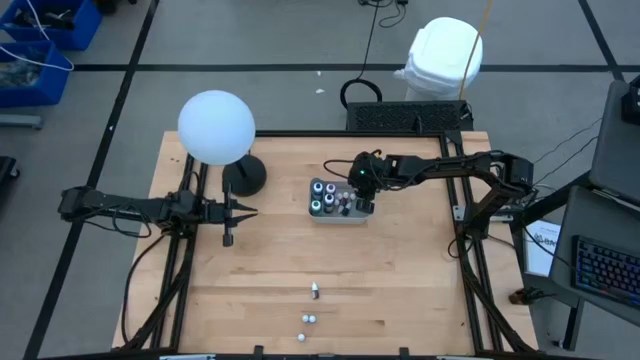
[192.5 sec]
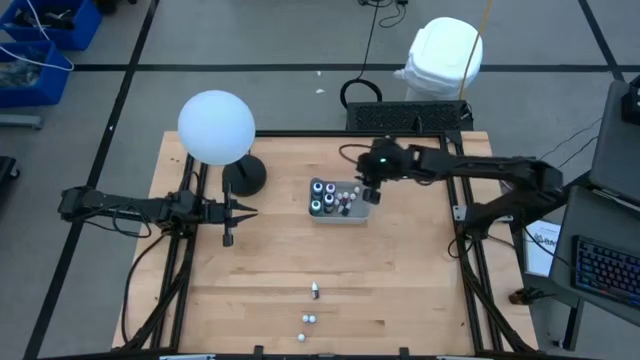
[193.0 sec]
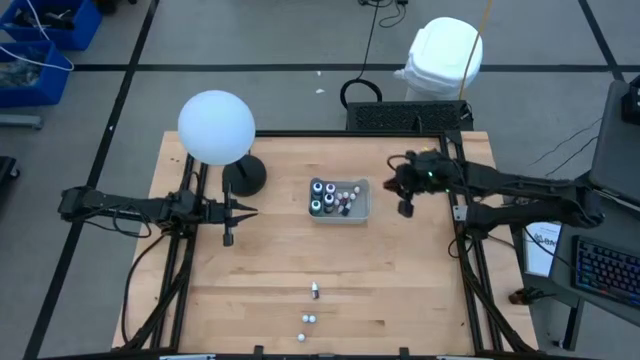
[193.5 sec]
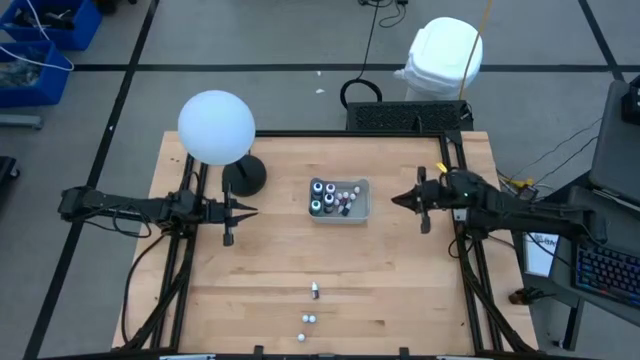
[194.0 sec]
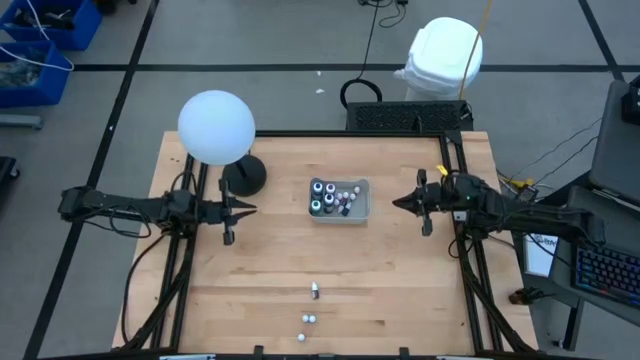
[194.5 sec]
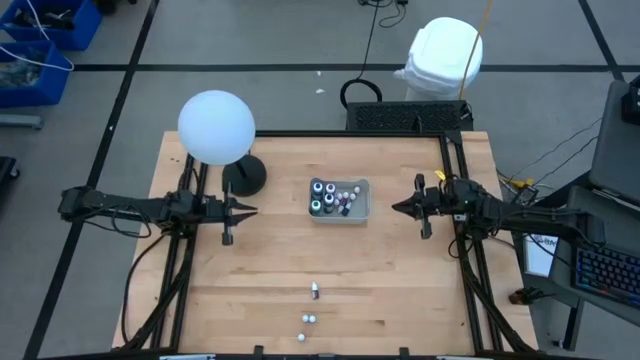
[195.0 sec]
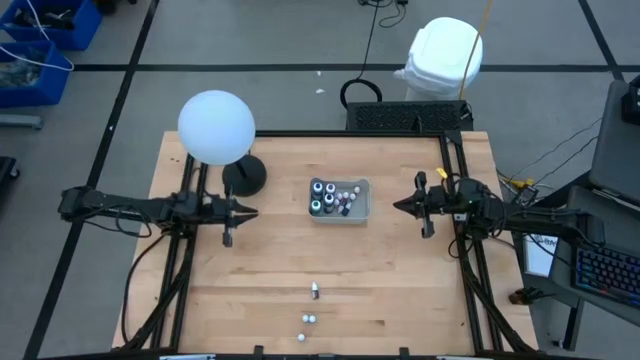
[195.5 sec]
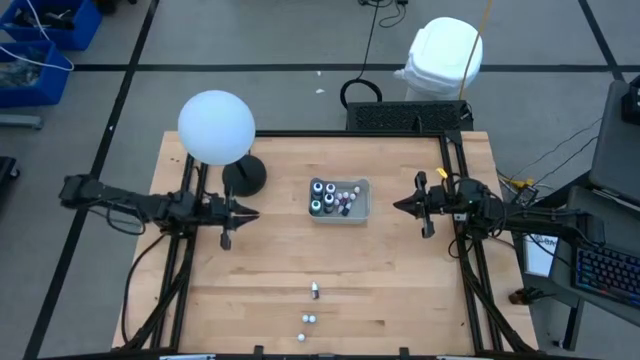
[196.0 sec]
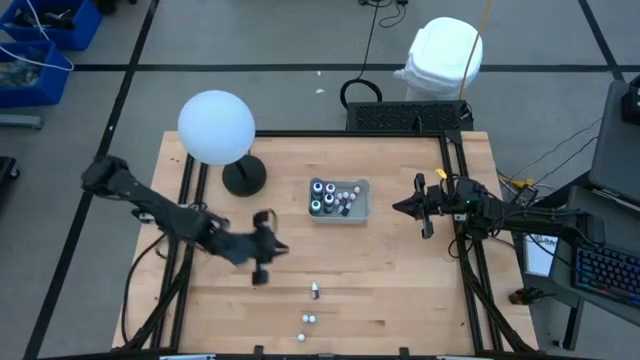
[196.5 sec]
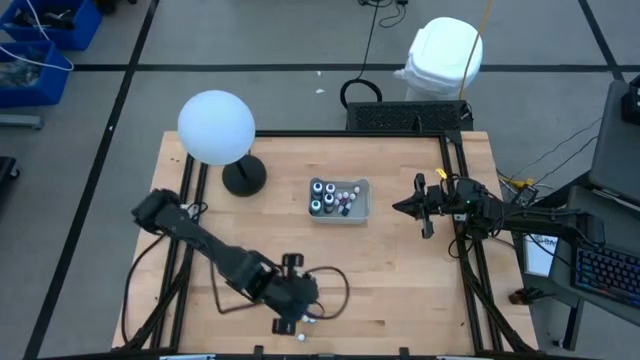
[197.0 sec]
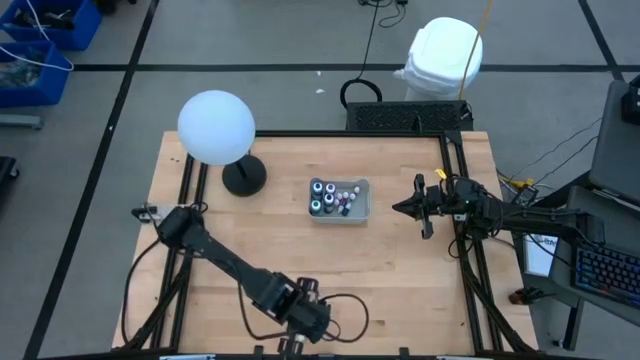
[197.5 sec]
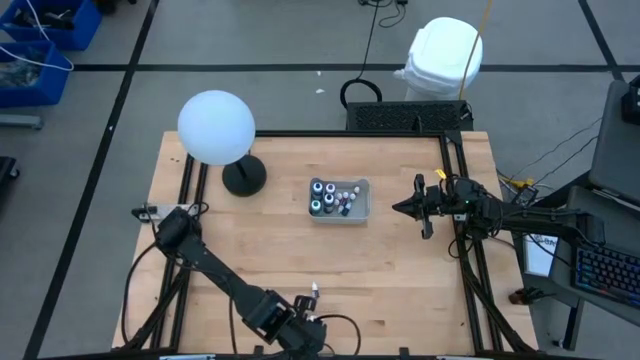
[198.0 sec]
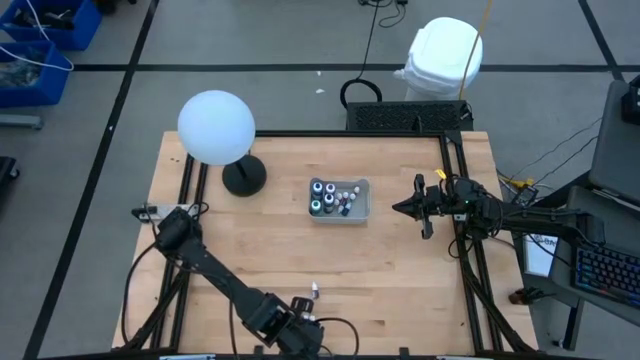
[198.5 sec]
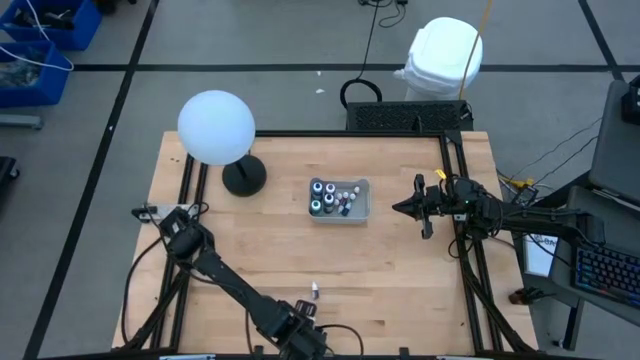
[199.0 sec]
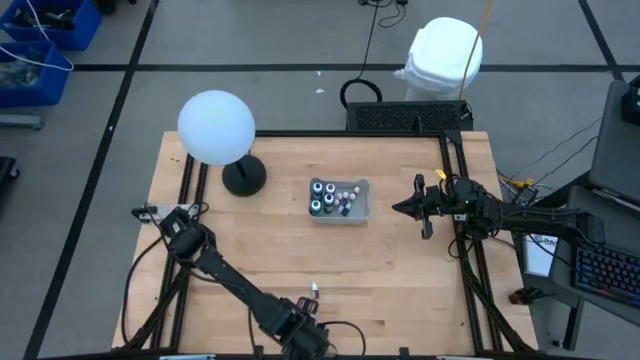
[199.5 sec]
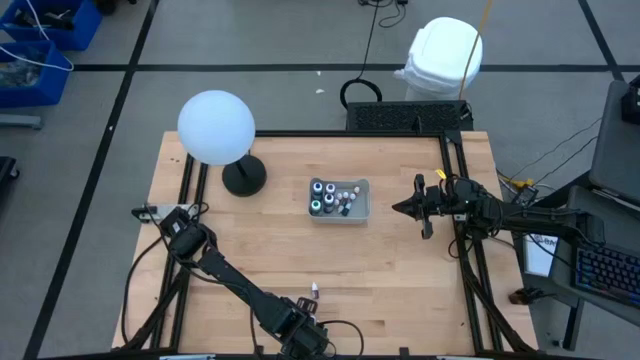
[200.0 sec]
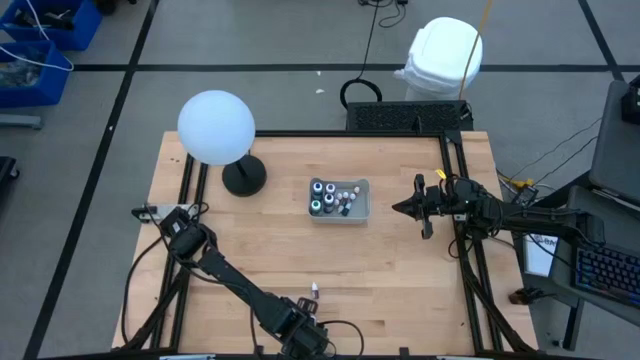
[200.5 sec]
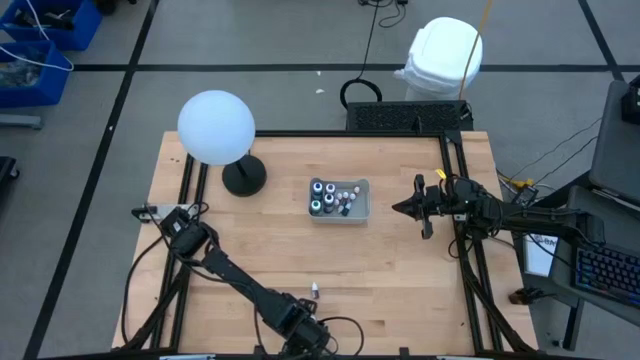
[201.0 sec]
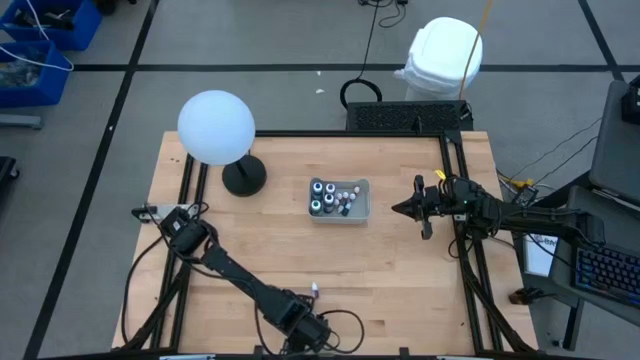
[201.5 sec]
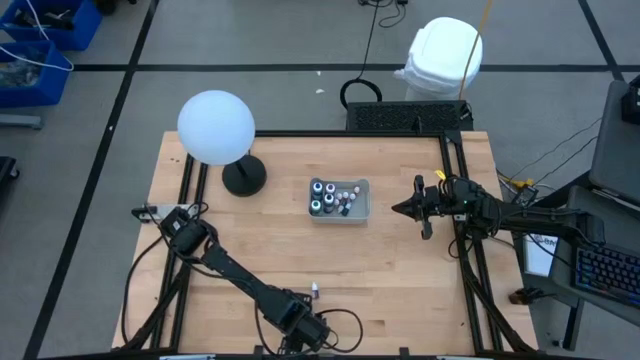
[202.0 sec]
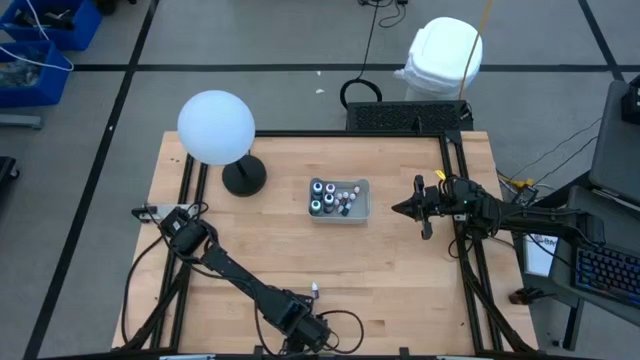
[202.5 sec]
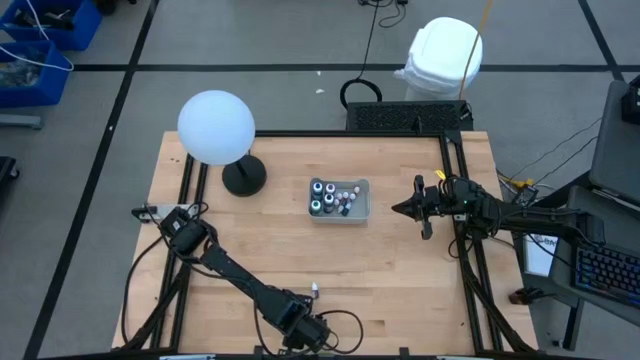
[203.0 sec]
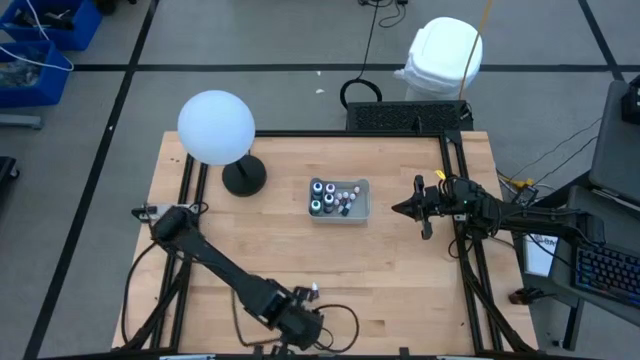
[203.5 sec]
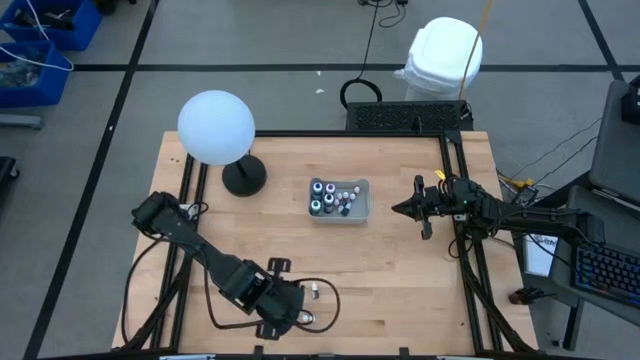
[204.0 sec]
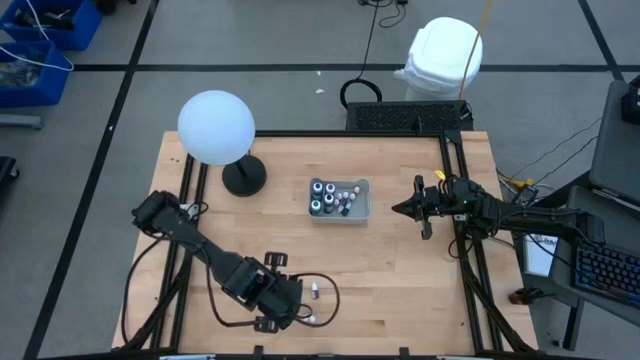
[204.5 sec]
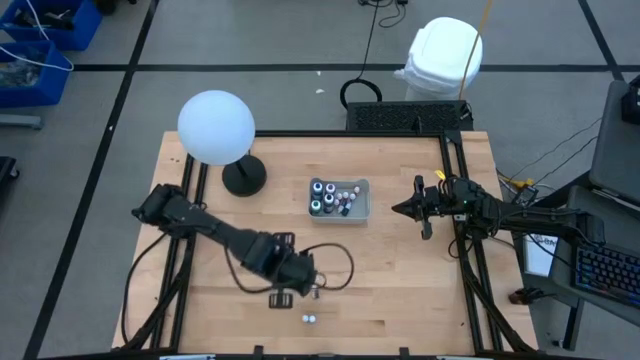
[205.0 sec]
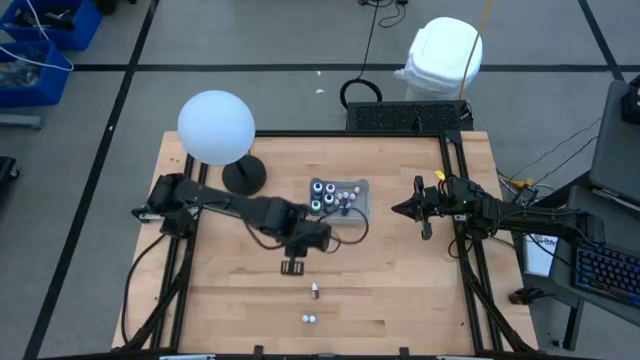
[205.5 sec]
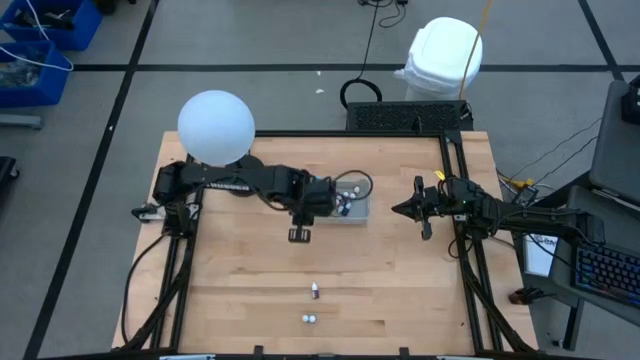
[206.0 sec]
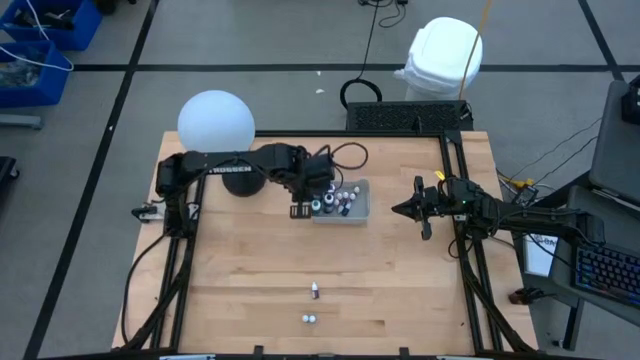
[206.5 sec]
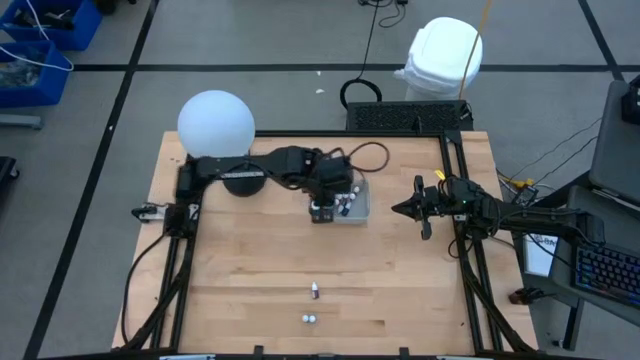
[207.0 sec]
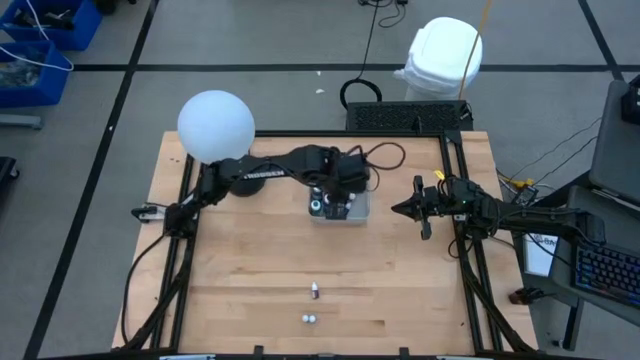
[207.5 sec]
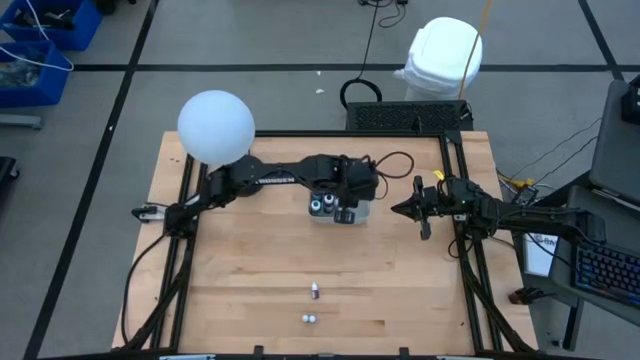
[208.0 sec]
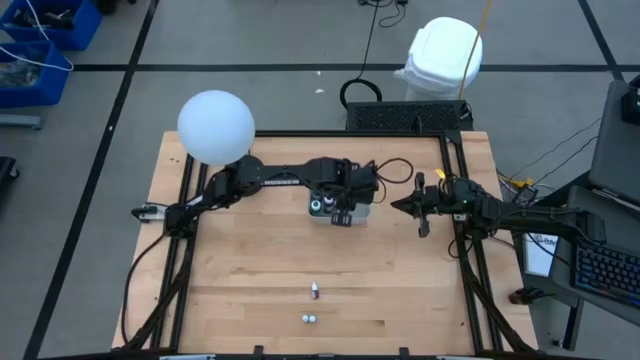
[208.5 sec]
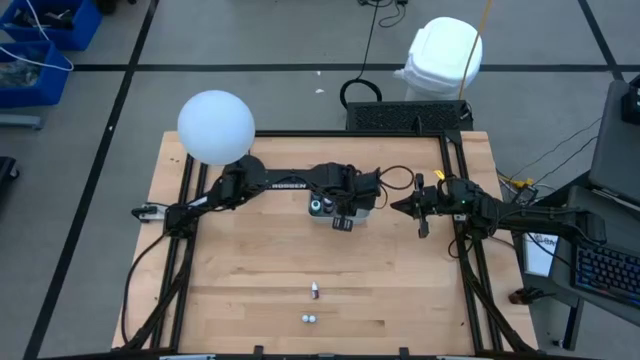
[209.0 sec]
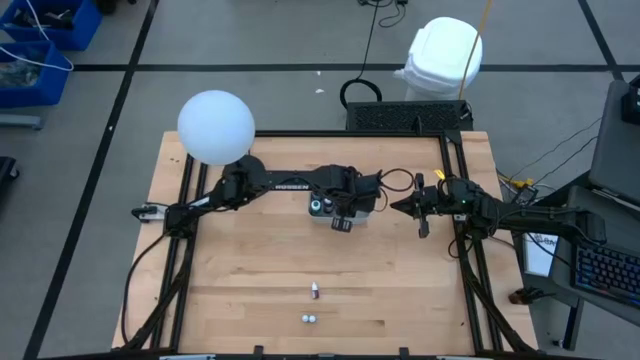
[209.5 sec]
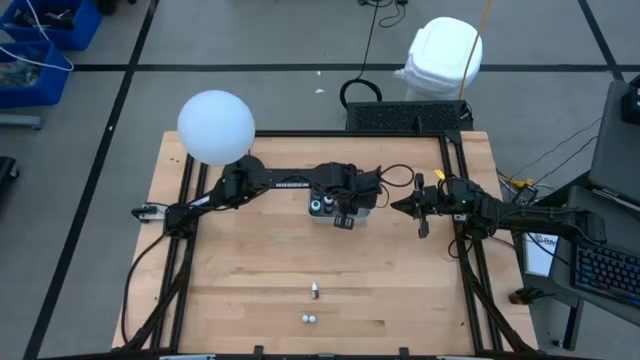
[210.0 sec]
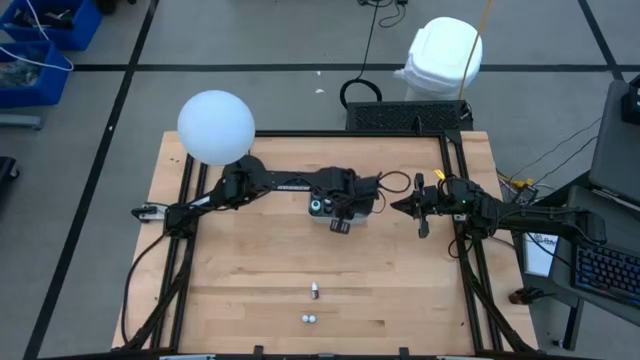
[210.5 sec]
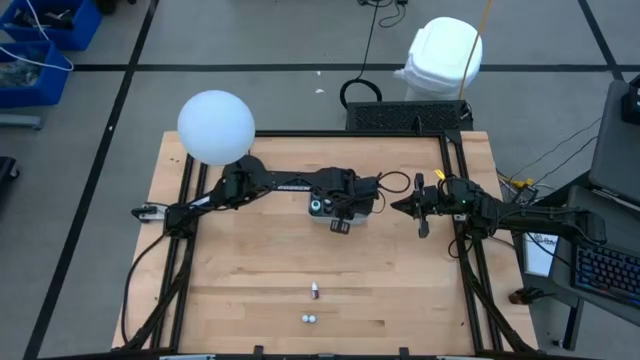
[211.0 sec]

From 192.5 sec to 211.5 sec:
Task: Pick & Place food coloring
Put the bottom small red food coloring bottle into the gray bin

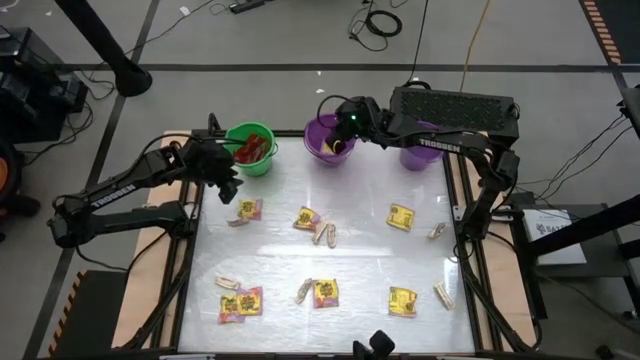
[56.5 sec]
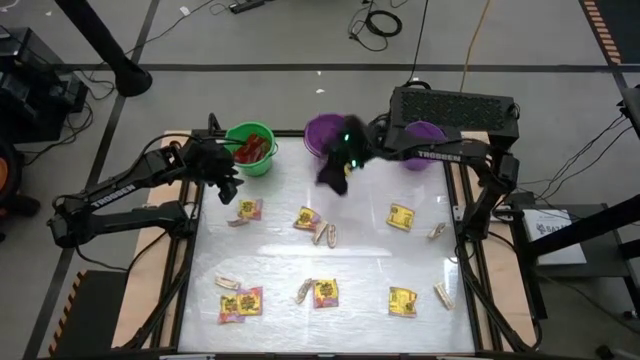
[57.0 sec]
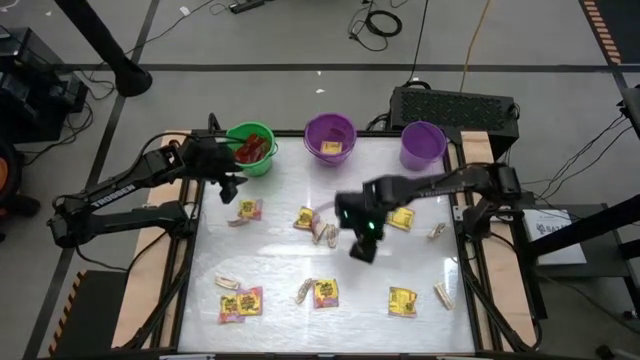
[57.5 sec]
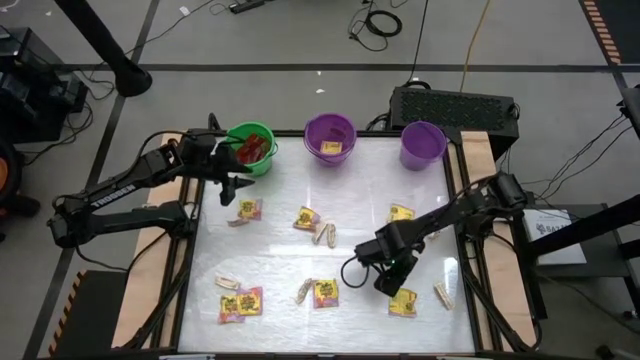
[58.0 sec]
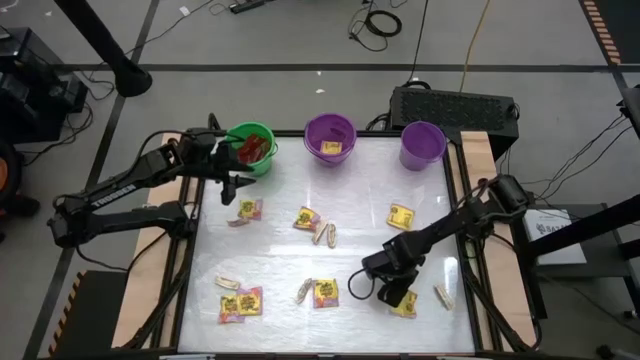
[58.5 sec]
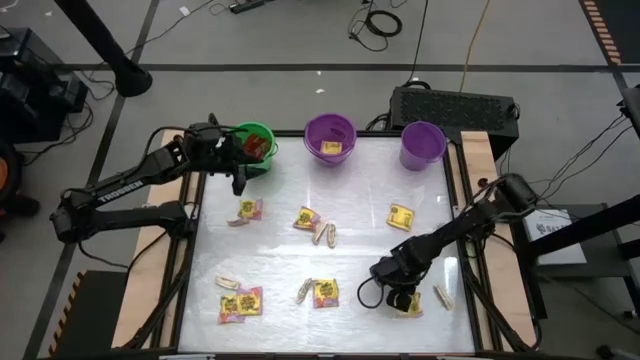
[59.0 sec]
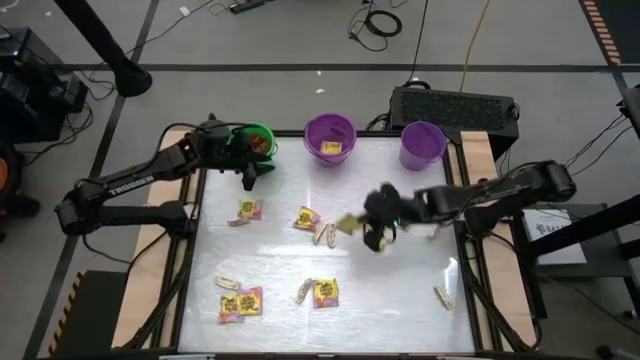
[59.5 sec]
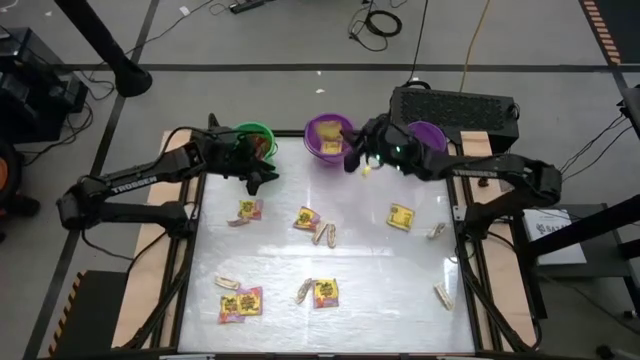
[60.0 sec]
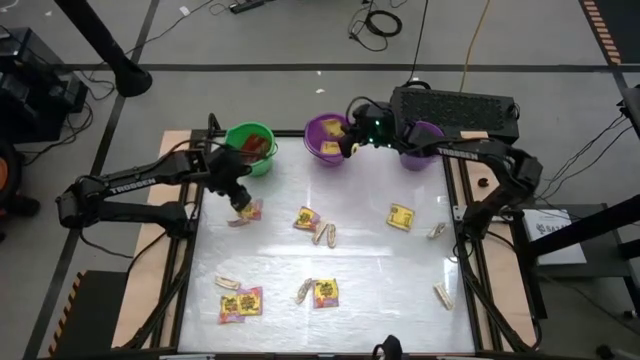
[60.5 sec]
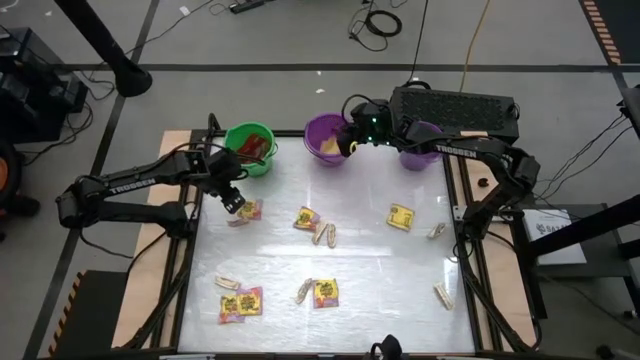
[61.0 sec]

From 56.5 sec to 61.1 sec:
Task: Sort candy by brand, put in halloween buckets
Put the yellow candy pack in the left purple bucket
